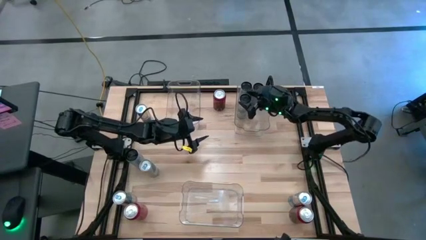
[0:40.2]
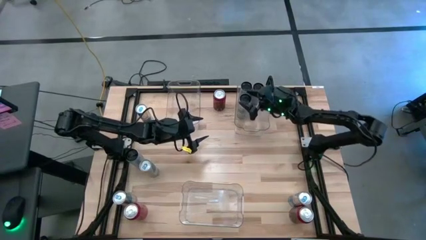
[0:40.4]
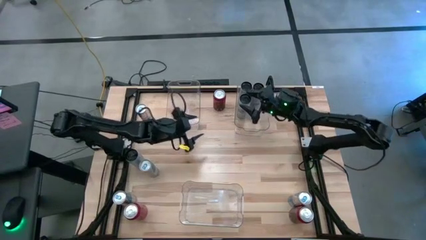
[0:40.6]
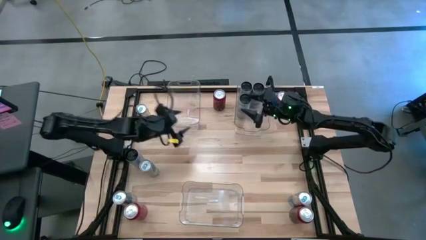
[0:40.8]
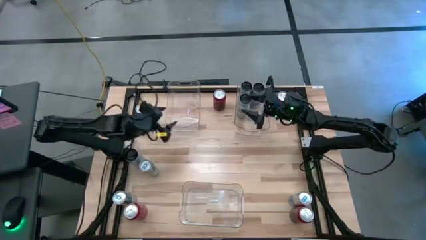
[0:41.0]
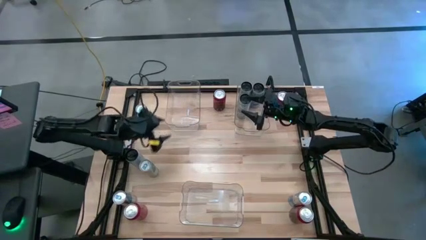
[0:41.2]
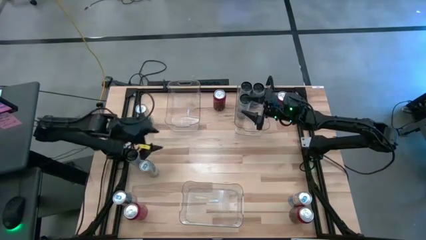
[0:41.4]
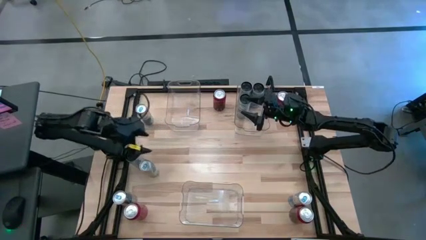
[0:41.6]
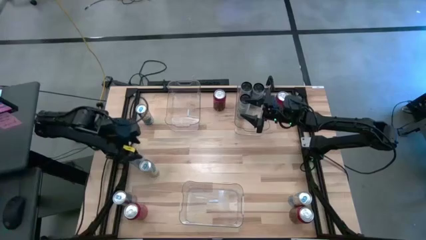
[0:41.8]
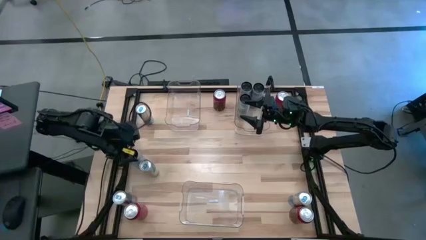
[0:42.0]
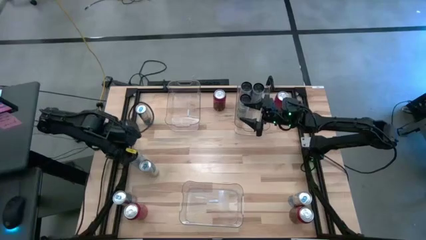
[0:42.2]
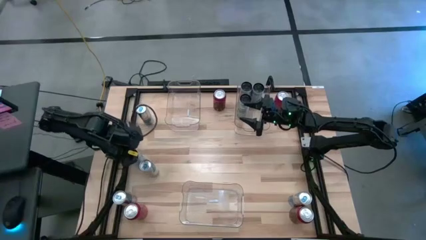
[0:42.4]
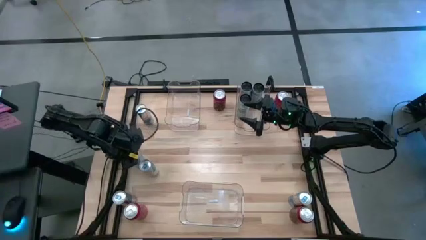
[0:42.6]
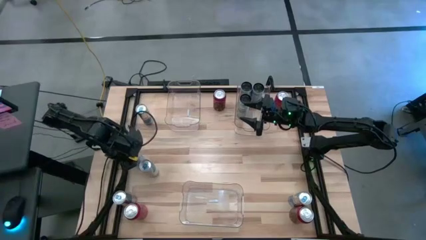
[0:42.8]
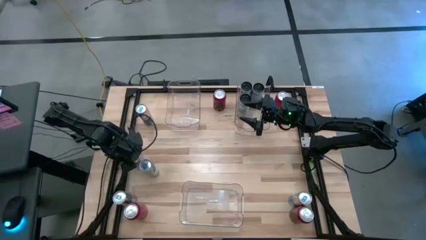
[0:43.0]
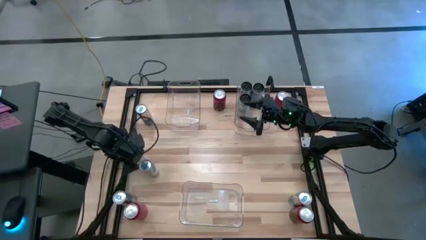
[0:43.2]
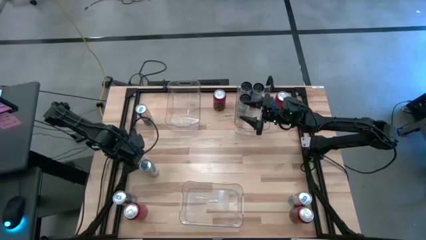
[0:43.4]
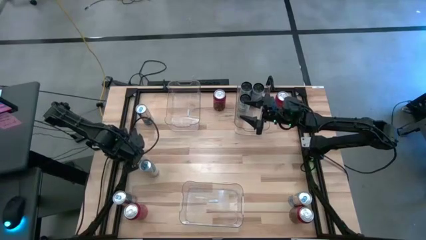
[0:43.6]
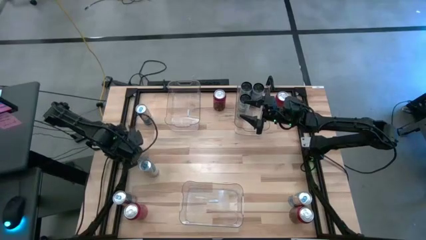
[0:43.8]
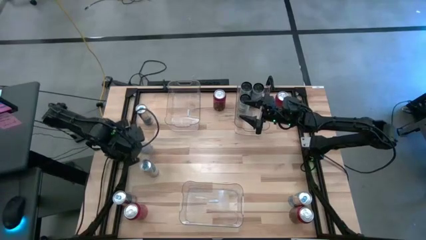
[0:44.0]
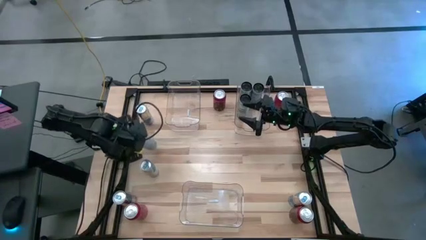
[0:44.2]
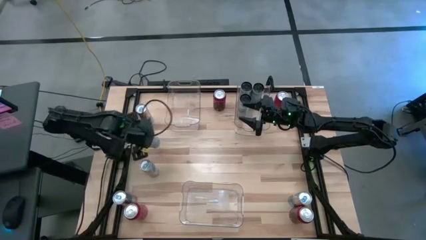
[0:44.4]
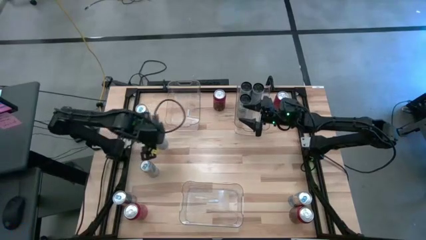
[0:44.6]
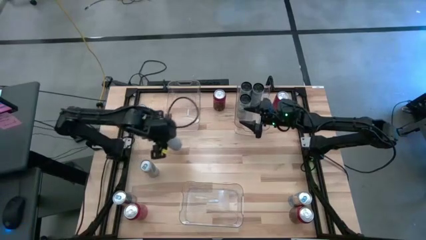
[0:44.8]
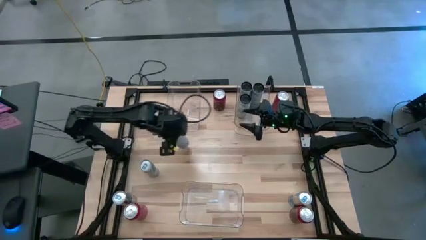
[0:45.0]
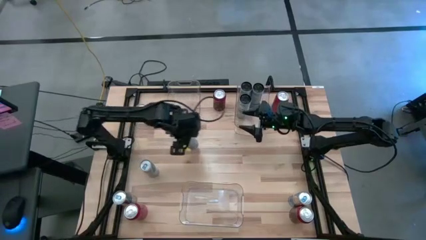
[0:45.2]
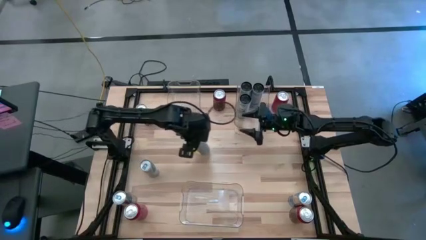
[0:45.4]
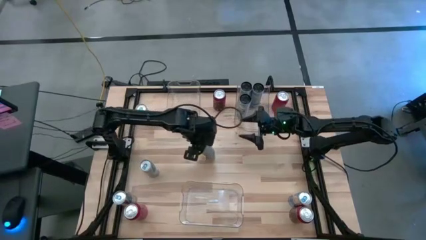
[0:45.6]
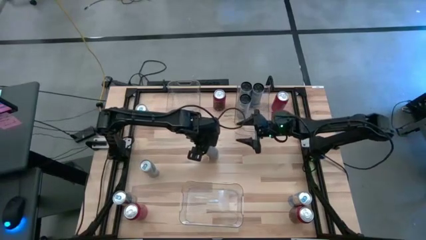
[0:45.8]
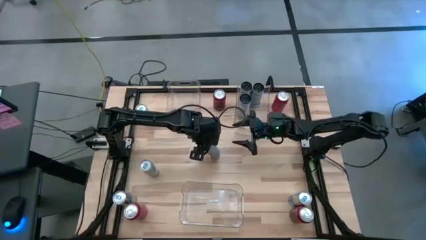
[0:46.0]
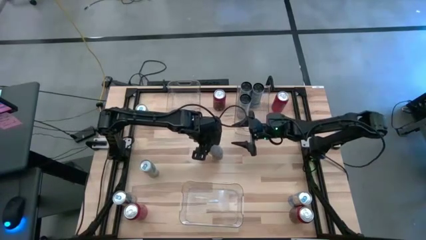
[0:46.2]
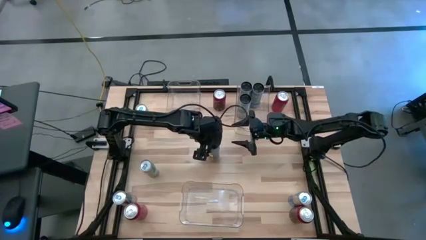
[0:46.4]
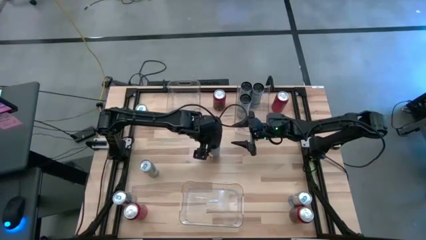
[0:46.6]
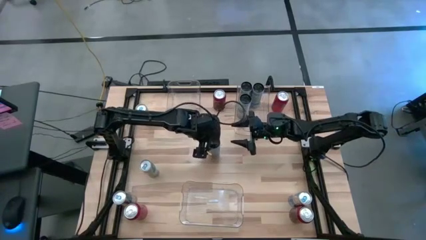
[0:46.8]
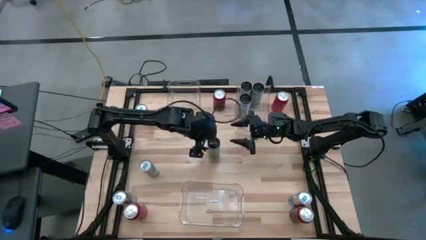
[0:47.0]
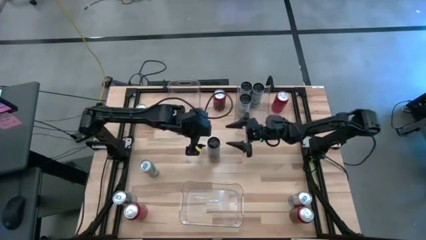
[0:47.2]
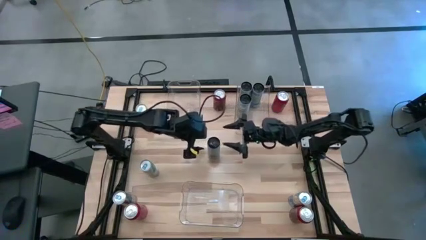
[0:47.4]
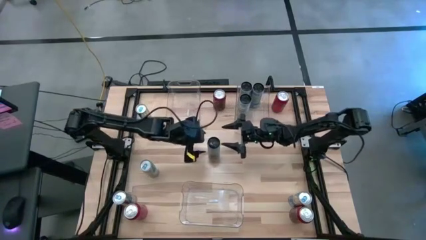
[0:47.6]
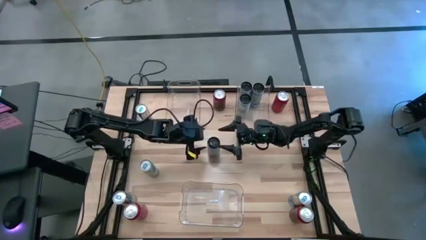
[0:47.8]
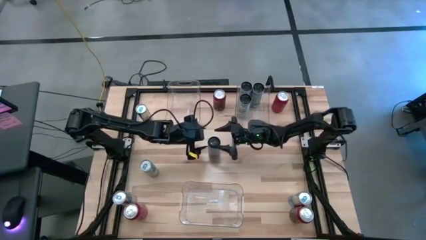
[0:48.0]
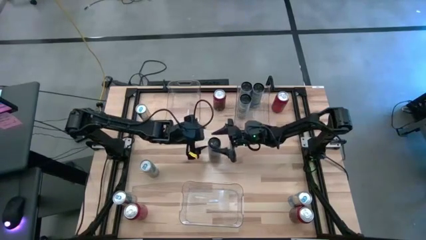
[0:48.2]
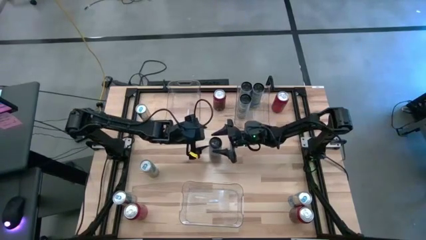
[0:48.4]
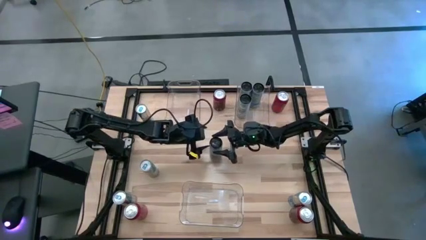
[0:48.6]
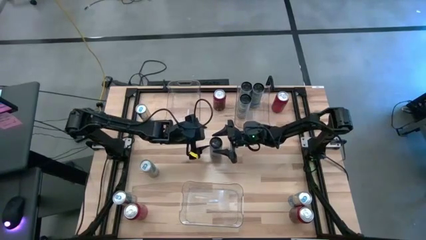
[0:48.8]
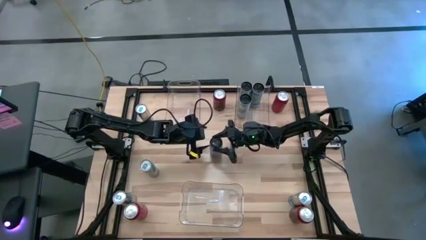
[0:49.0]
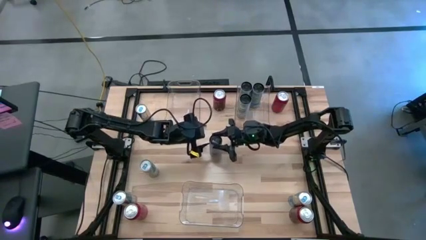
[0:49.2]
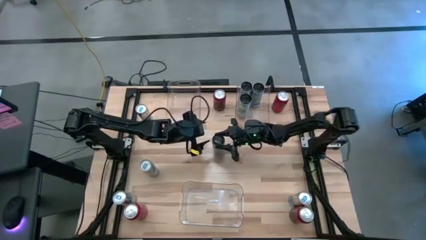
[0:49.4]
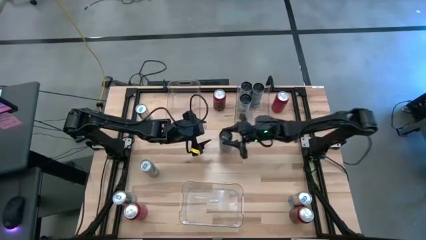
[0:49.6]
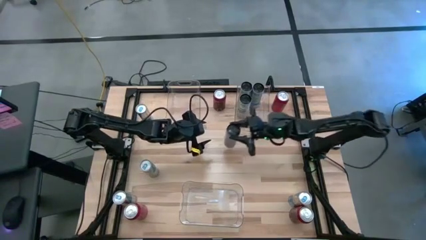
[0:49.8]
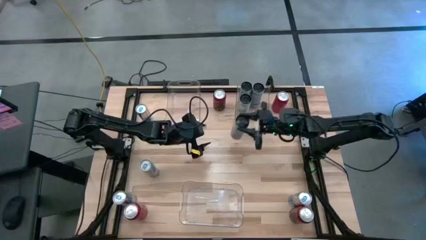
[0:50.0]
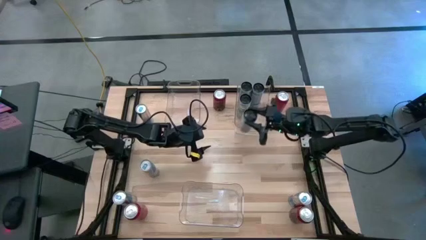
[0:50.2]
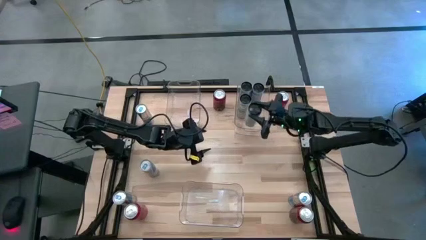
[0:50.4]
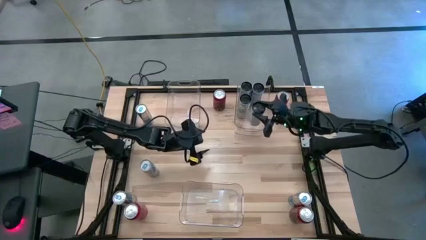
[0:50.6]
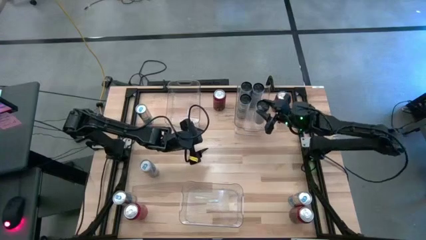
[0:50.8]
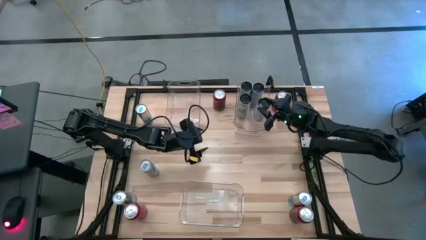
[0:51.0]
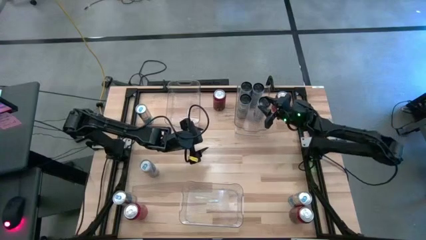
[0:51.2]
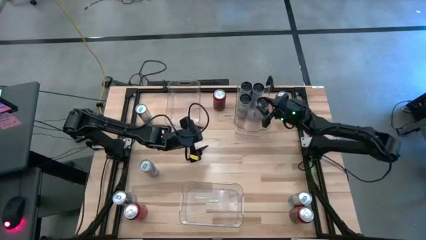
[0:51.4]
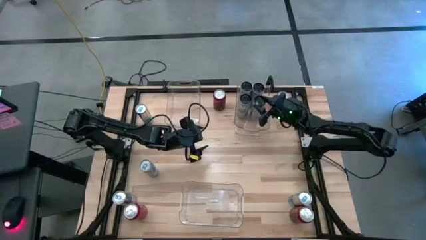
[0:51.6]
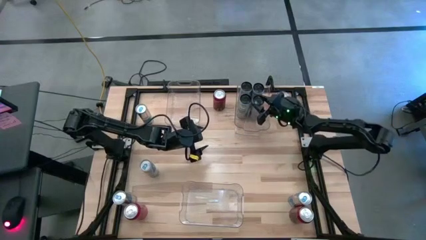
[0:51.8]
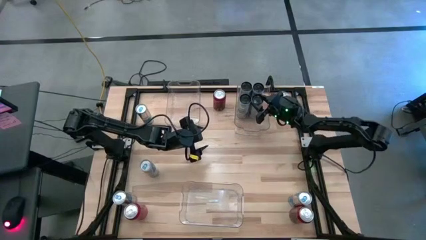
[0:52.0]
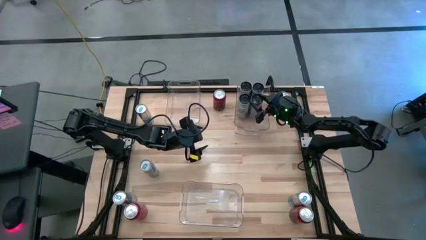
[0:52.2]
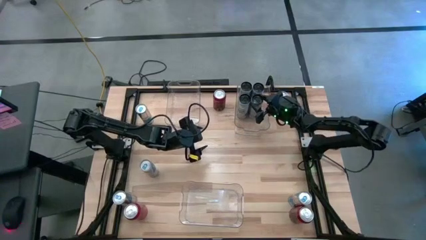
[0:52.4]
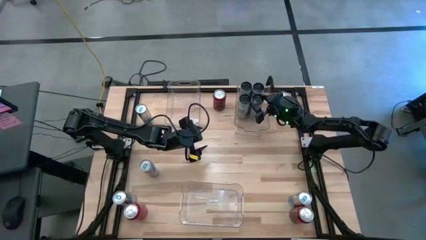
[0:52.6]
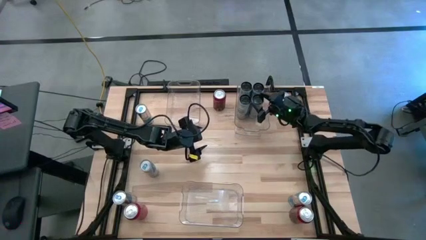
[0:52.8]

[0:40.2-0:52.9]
Task: Sort soda cans
Put the white-blue soda can into the top right transparent bin
